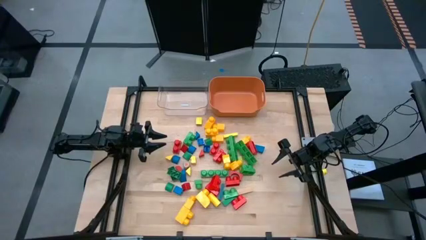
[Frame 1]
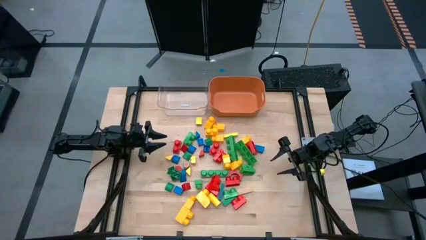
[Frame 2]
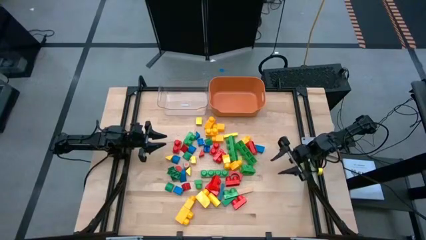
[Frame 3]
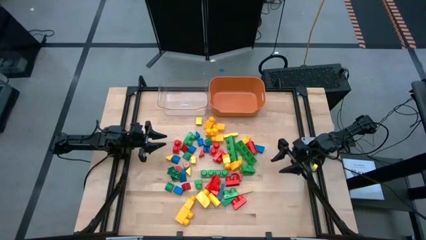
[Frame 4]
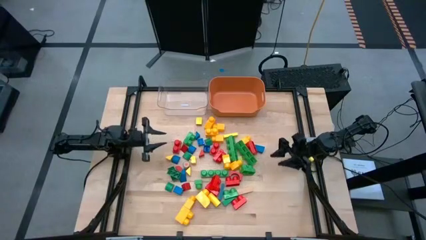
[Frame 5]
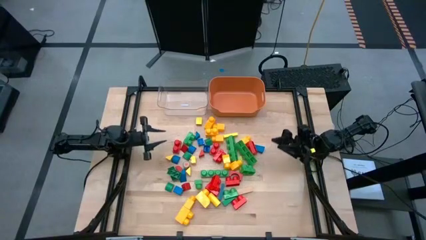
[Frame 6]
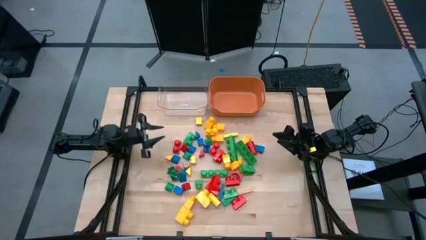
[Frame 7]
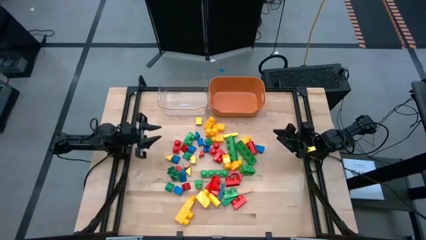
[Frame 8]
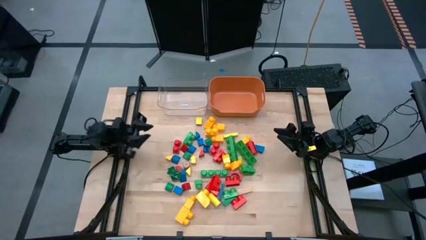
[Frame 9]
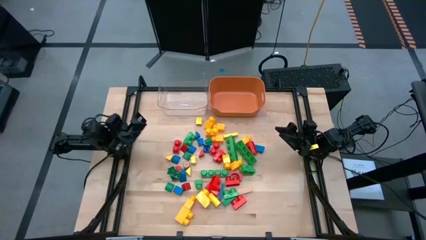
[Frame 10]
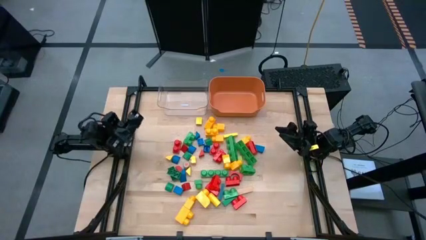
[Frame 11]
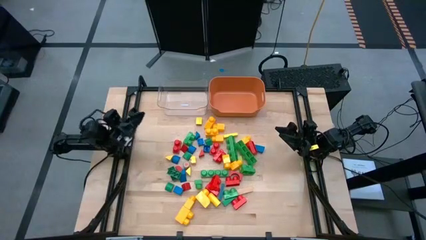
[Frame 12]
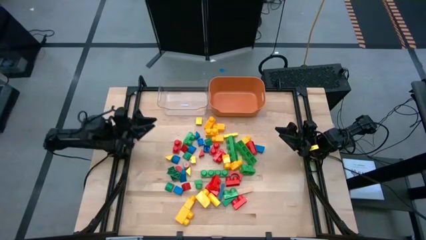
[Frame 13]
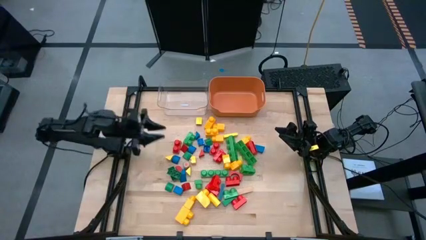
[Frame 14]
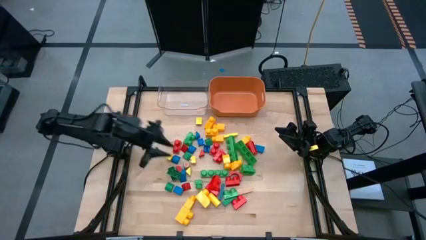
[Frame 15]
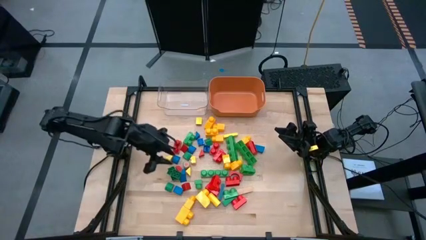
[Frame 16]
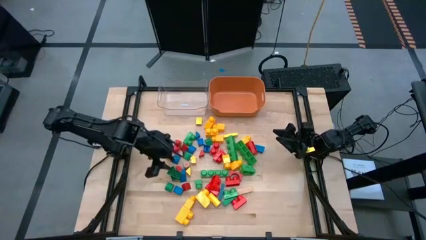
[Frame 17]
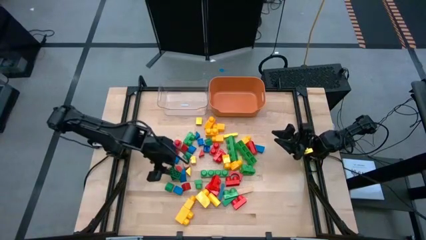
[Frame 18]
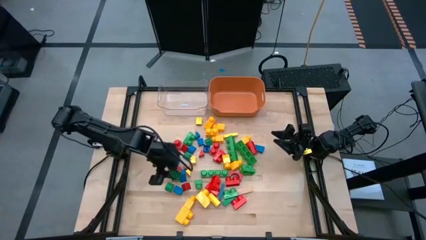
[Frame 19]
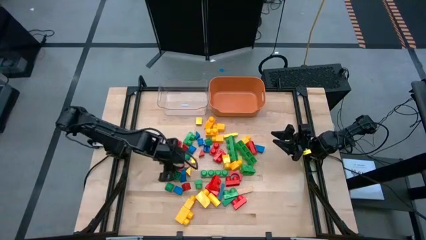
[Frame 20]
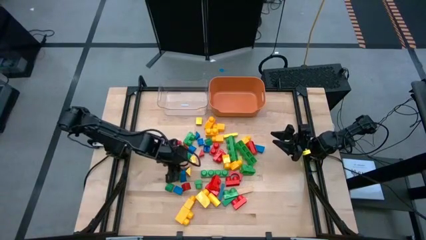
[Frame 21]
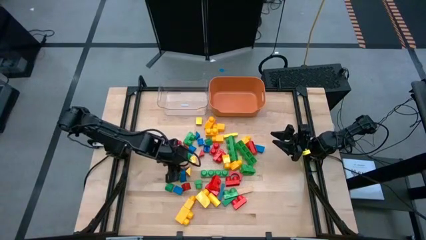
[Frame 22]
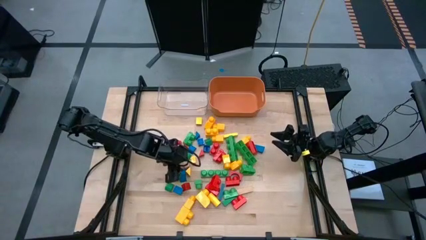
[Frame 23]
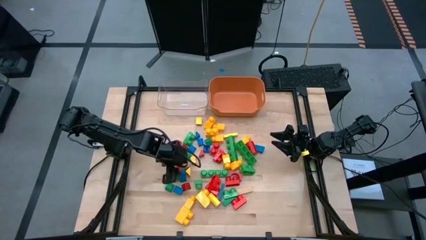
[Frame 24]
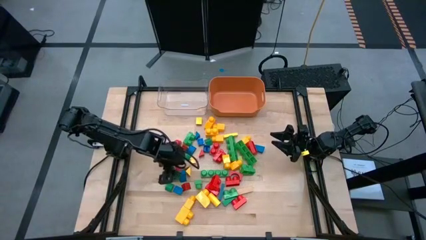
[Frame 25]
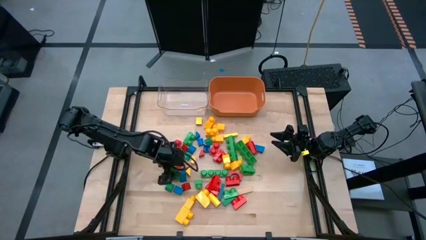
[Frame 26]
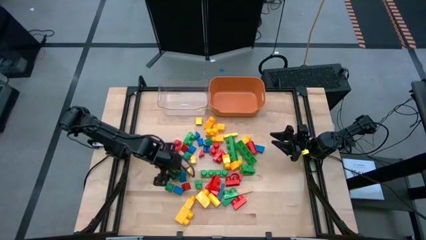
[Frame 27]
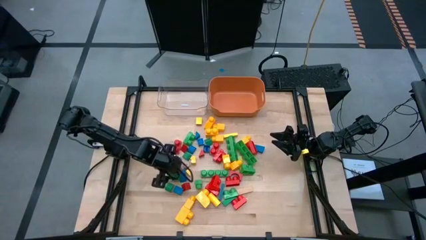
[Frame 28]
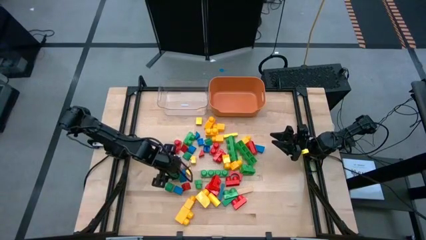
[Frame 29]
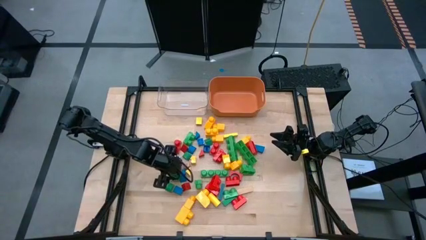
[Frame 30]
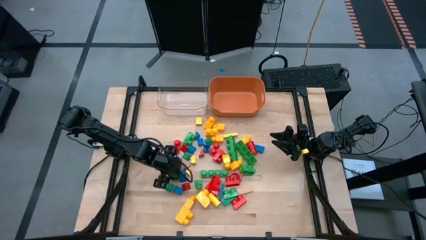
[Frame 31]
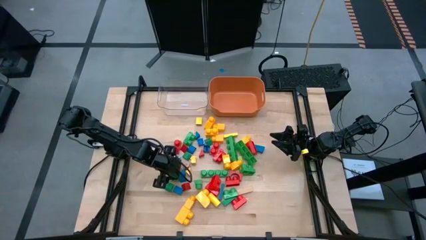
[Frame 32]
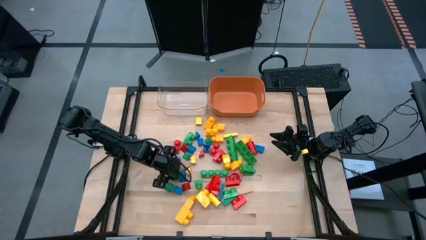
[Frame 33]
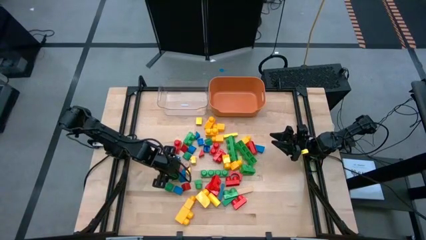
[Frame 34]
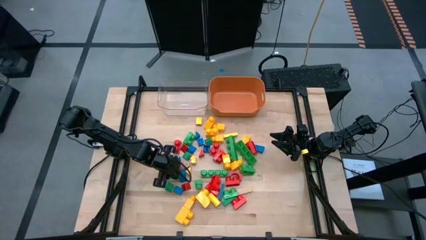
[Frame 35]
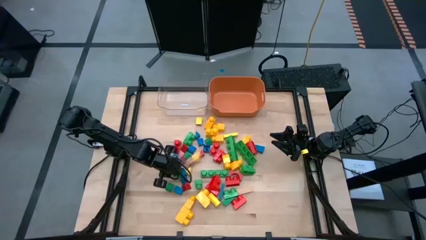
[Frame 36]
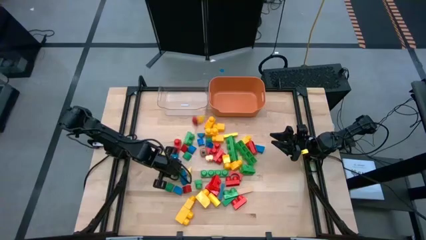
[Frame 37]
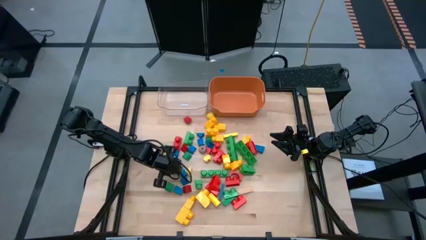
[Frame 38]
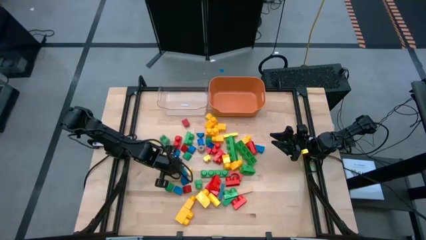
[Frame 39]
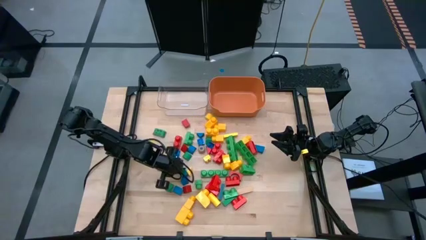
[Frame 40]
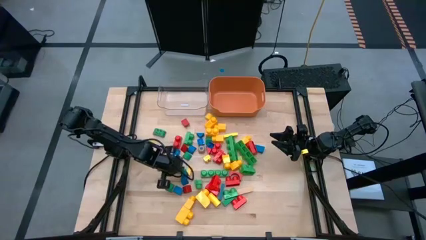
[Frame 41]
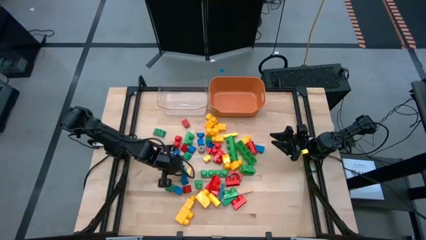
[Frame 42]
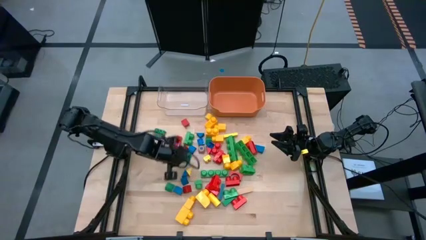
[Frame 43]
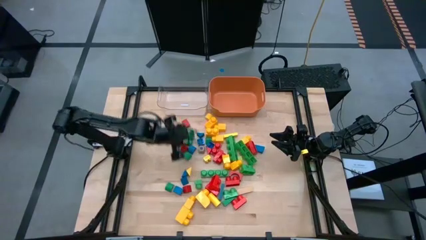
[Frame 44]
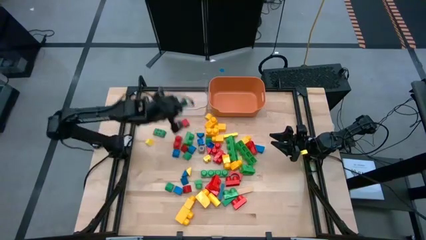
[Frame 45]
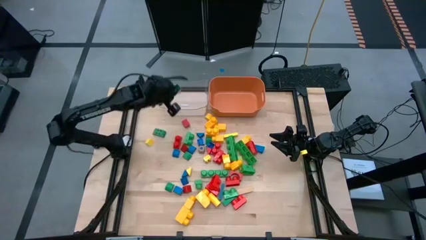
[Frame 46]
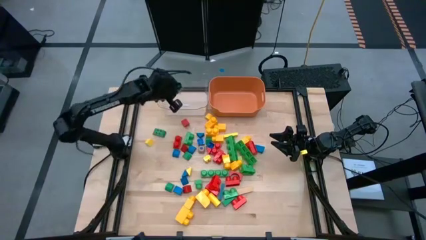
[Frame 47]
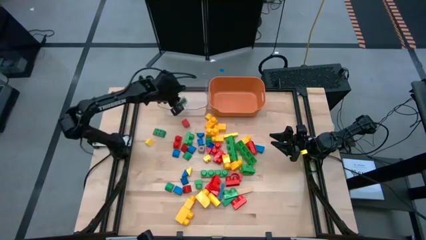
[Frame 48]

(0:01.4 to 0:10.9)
Task: Sort blocks by size
Put the small green game piece into the transparent bin

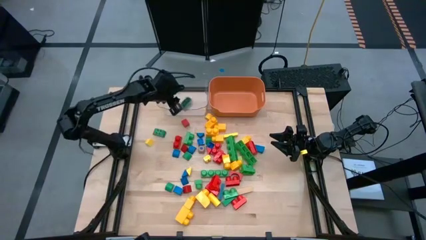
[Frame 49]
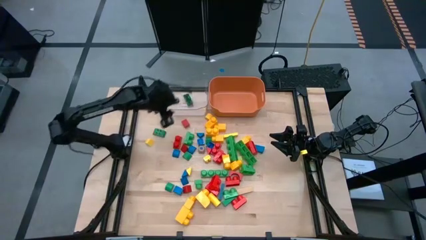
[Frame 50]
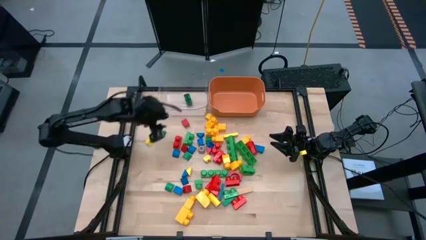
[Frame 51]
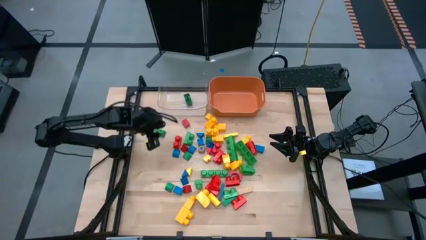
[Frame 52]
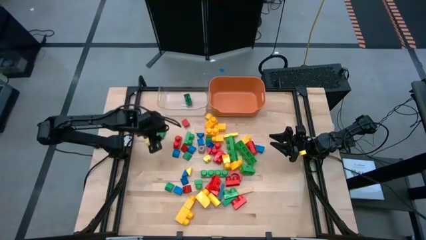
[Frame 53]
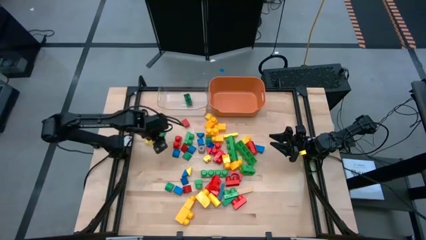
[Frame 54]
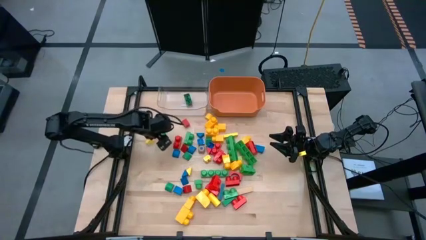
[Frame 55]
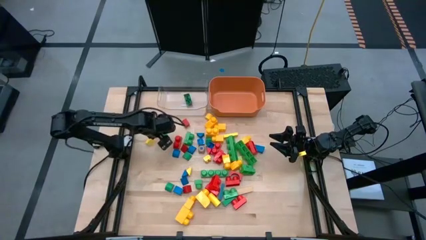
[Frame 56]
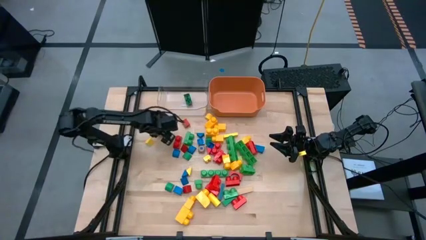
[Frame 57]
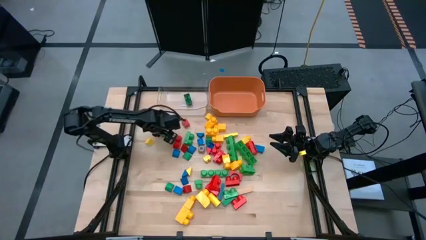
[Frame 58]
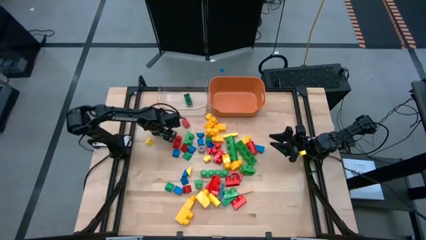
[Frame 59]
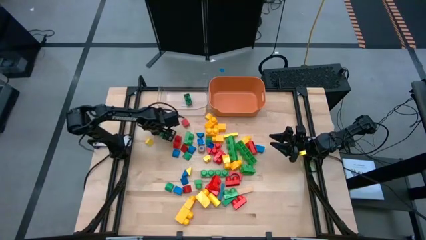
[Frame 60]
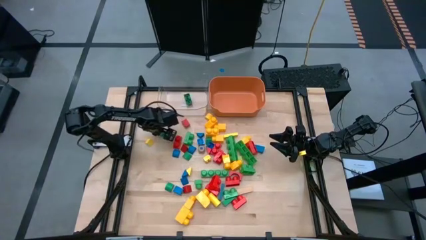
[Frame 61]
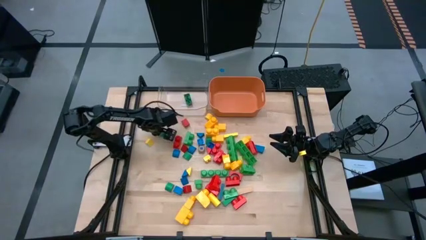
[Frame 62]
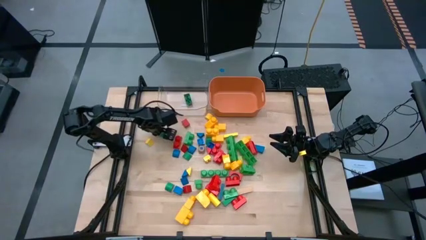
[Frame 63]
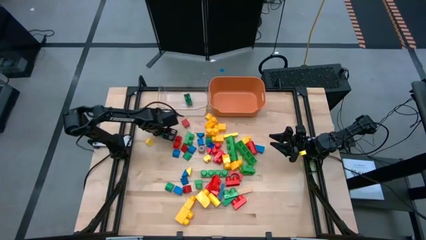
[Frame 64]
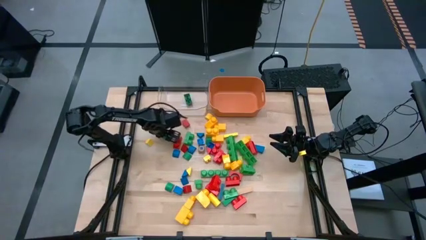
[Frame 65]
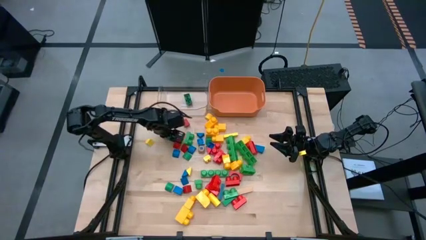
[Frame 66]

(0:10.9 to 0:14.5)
Put the small green game piece into the transparent bin

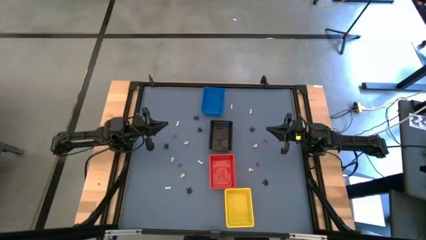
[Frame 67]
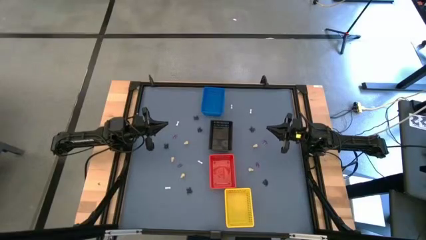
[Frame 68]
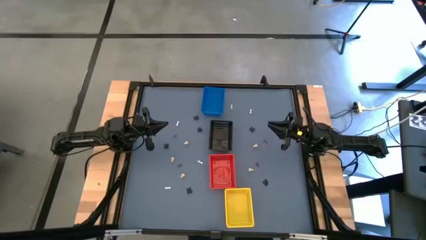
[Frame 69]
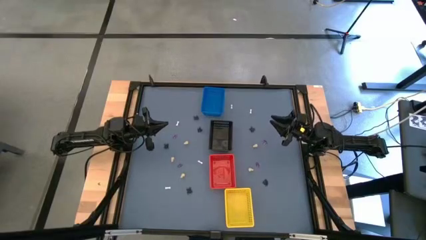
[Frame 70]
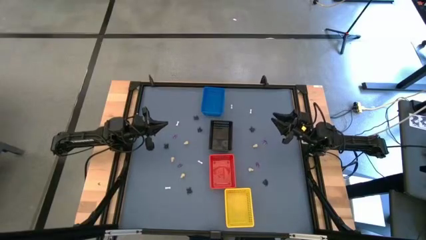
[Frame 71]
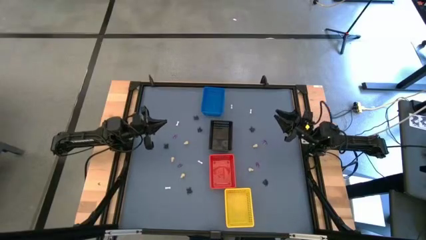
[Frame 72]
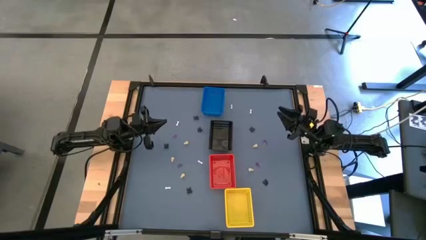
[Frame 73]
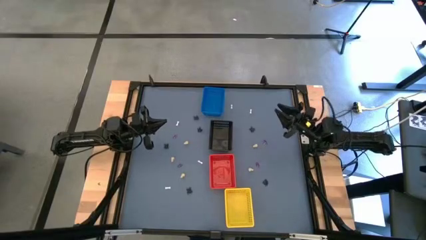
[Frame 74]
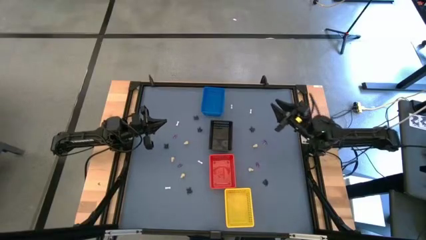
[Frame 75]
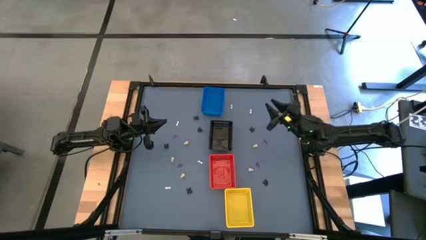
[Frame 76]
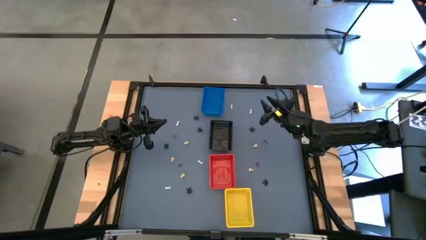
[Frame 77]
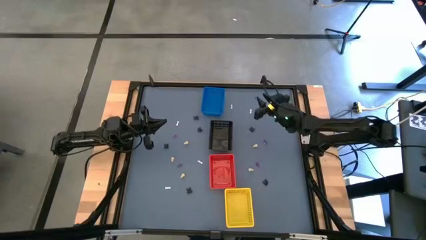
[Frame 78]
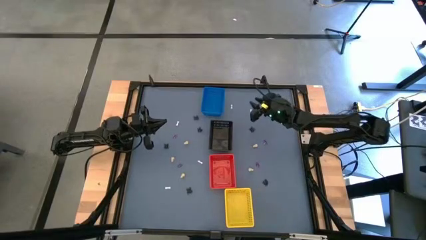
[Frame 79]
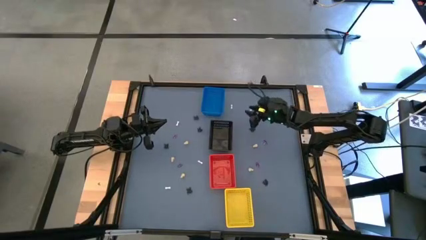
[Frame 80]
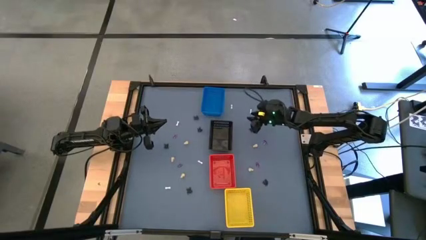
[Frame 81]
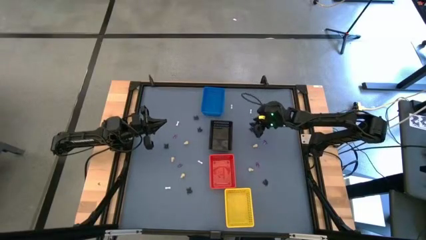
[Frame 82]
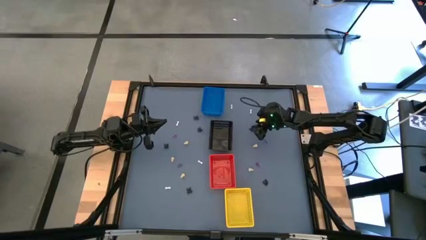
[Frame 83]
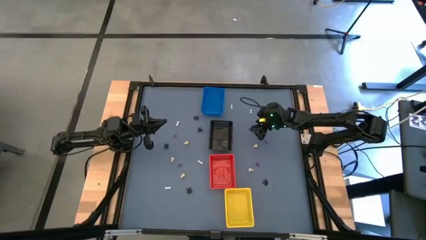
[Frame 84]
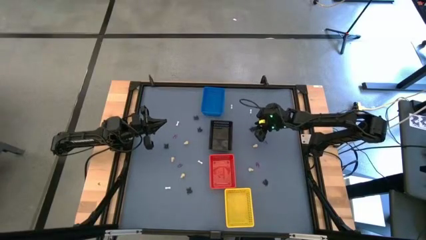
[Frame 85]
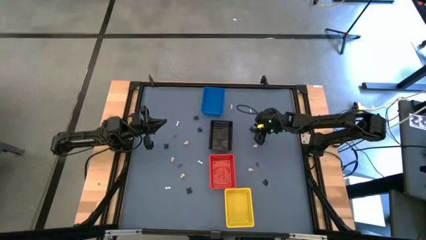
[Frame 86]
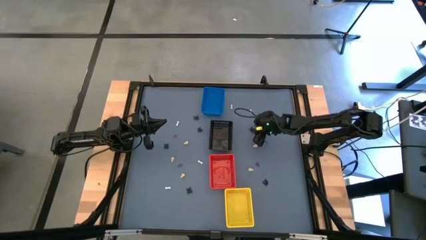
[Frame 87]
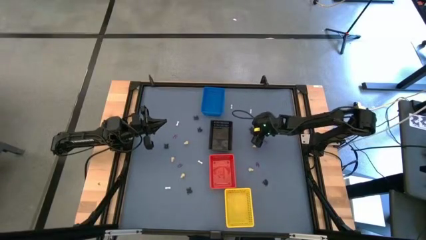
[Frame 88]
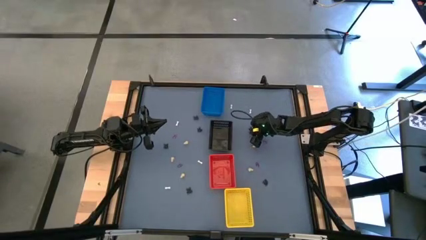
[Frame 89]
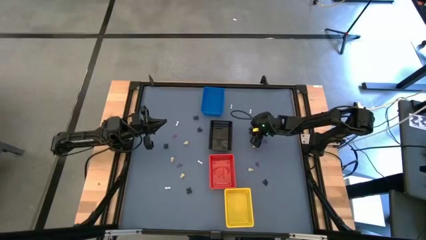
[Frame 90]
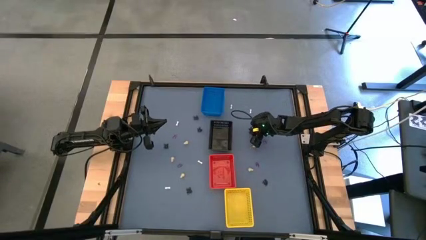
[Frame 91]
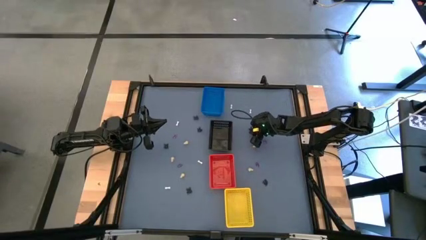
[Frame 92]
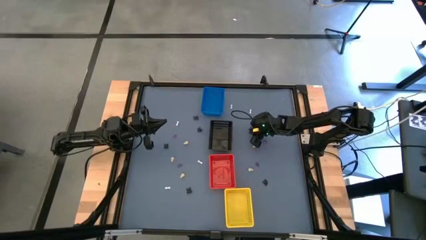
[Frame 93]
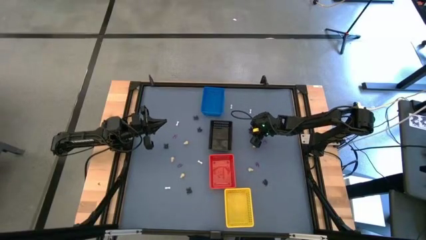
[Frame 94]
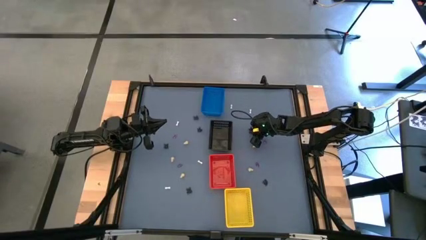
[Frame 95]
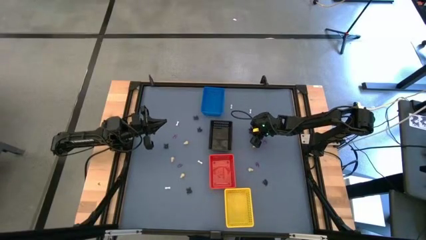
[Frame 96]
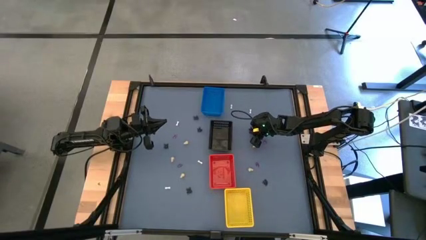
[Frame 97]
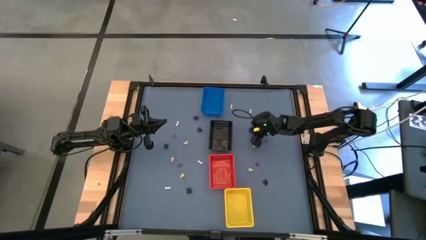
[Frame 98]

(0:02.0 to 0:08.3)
Task: Sort Halloween decoration
Put the black spider toy into the black bin
